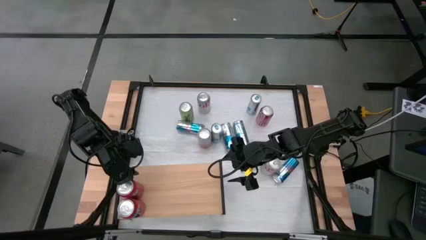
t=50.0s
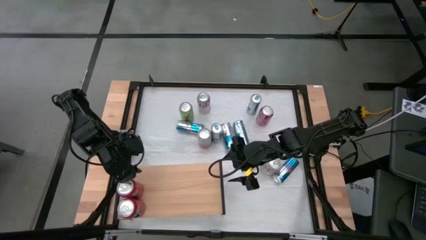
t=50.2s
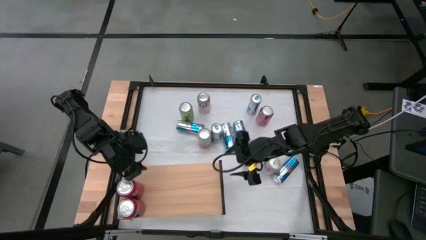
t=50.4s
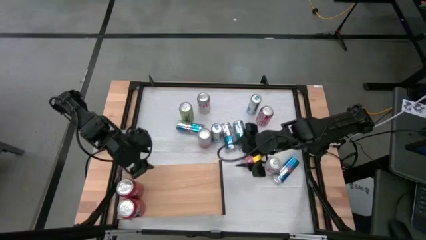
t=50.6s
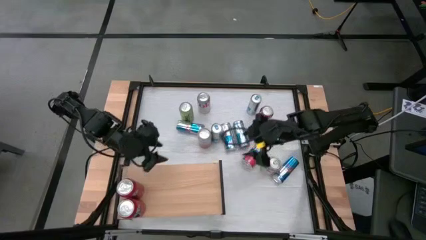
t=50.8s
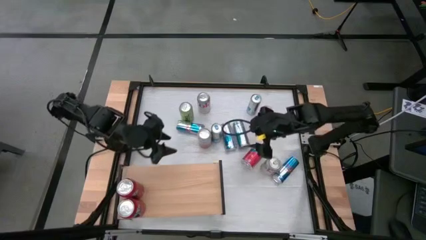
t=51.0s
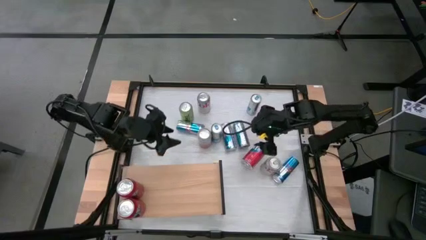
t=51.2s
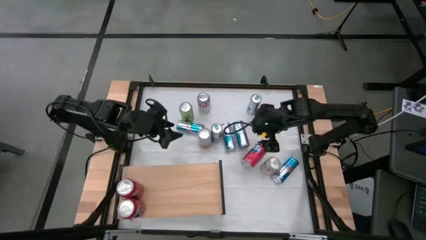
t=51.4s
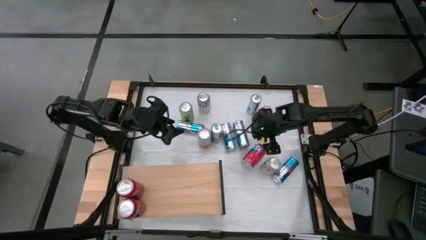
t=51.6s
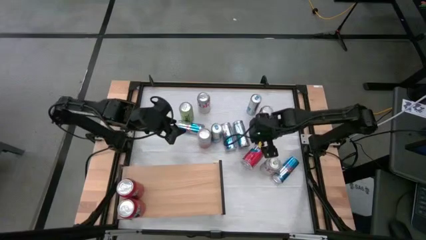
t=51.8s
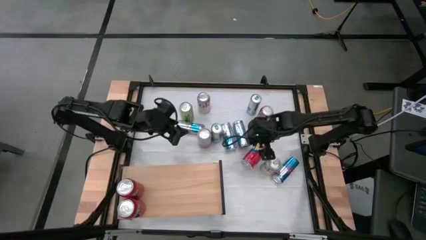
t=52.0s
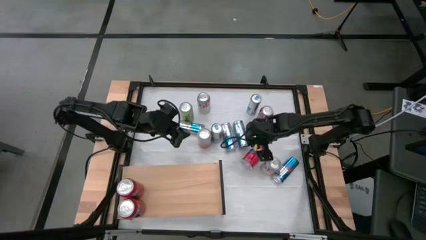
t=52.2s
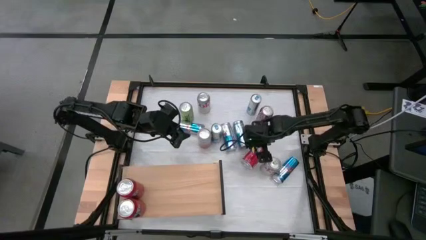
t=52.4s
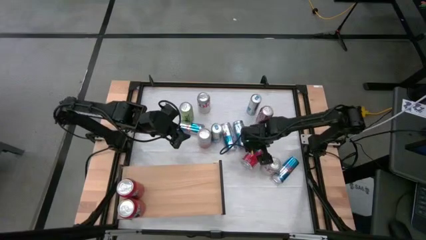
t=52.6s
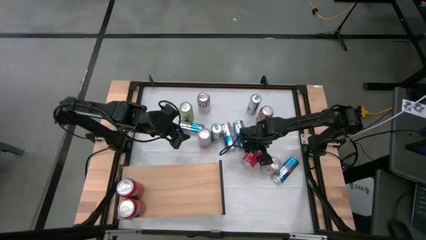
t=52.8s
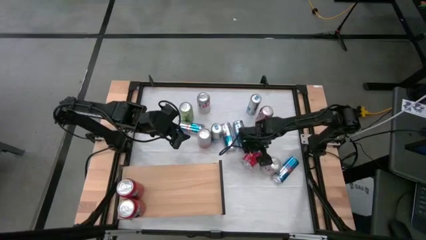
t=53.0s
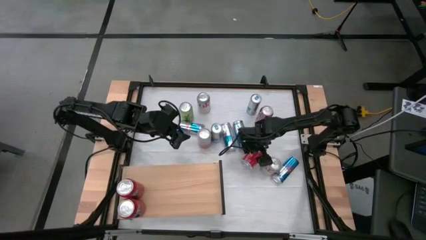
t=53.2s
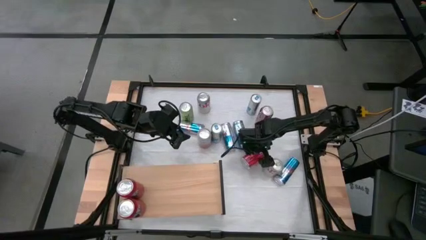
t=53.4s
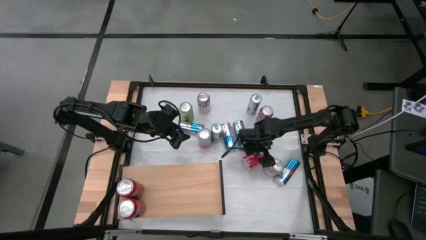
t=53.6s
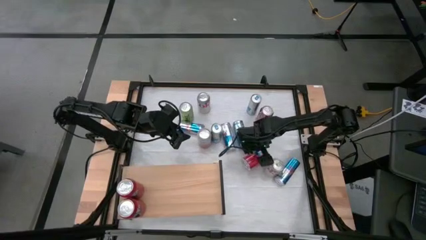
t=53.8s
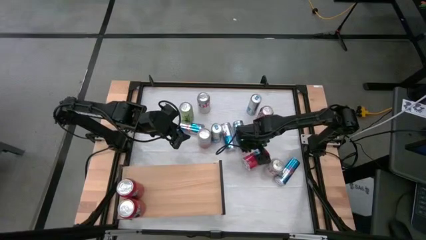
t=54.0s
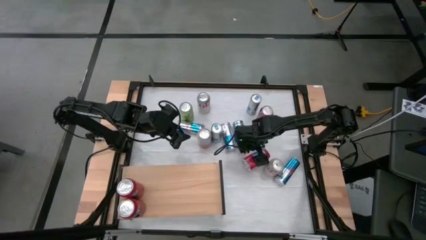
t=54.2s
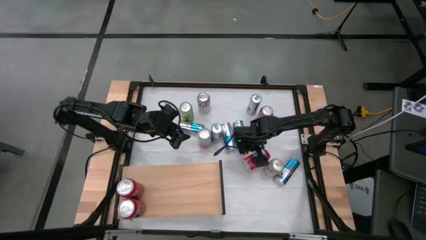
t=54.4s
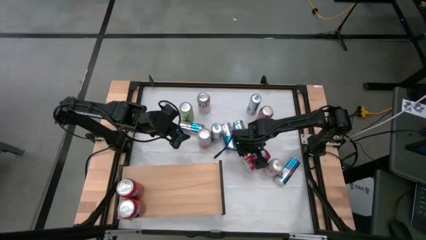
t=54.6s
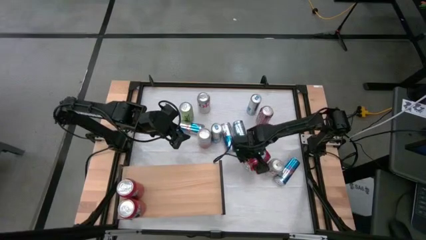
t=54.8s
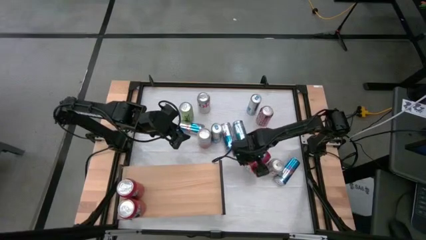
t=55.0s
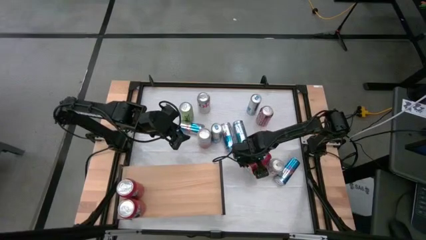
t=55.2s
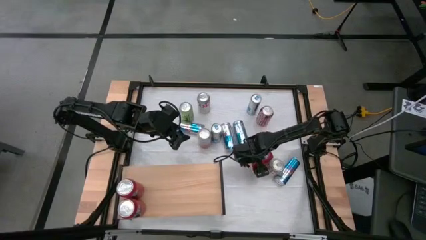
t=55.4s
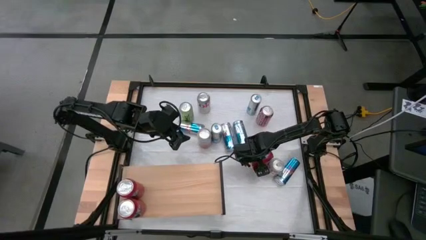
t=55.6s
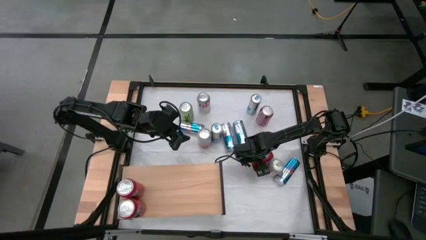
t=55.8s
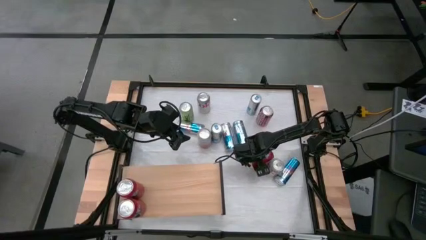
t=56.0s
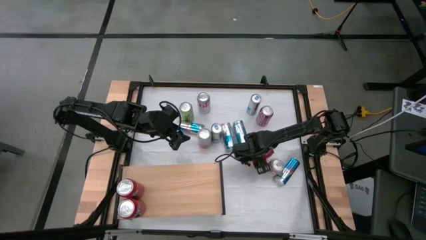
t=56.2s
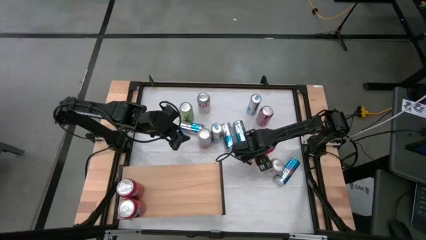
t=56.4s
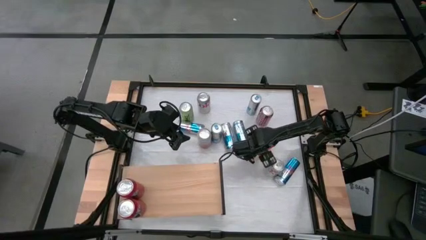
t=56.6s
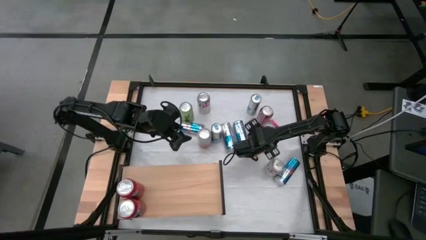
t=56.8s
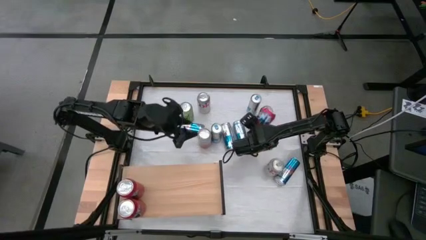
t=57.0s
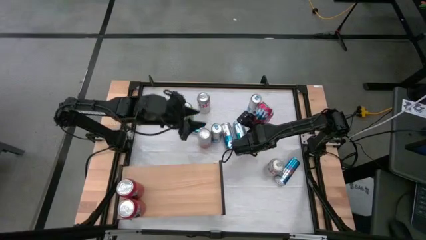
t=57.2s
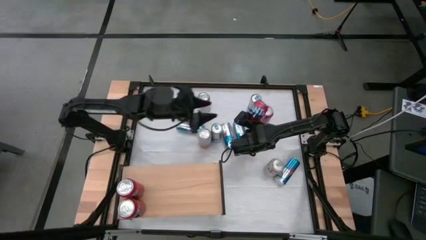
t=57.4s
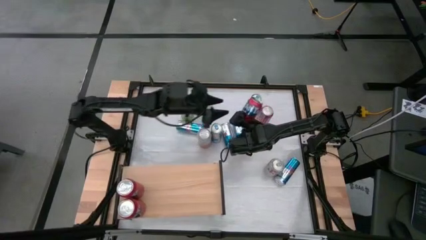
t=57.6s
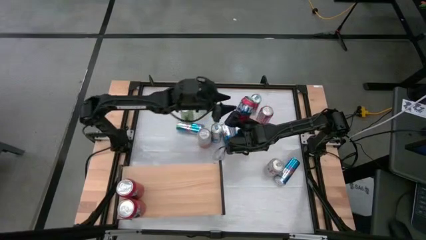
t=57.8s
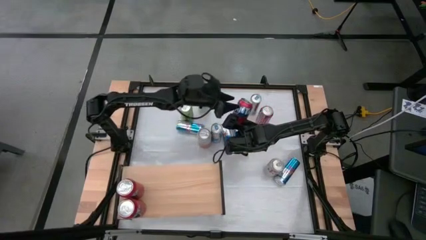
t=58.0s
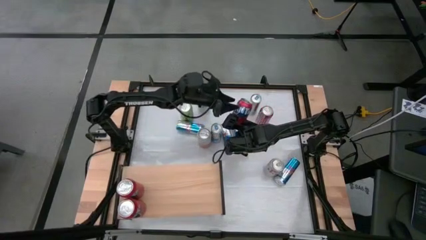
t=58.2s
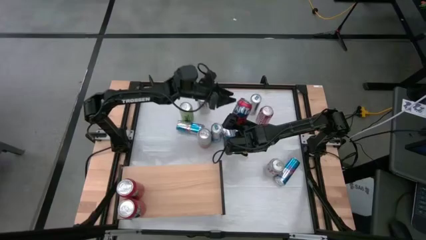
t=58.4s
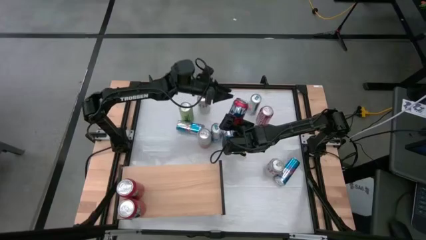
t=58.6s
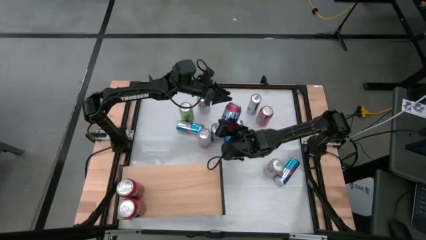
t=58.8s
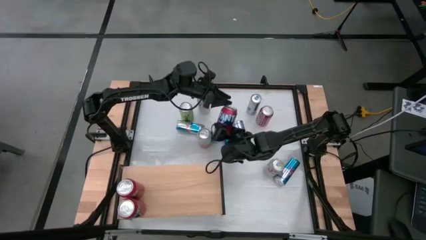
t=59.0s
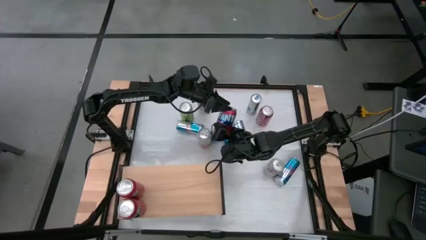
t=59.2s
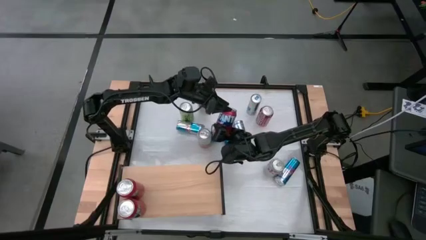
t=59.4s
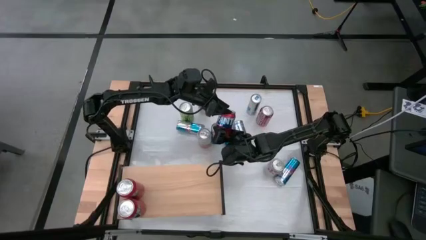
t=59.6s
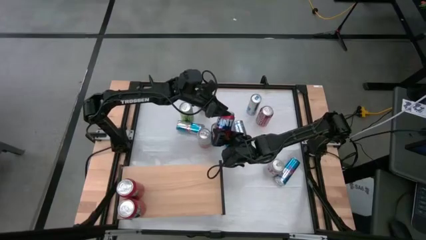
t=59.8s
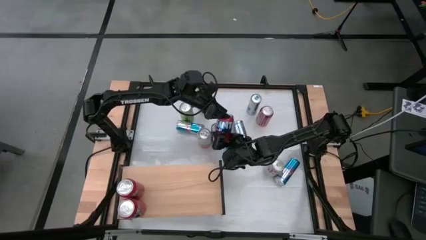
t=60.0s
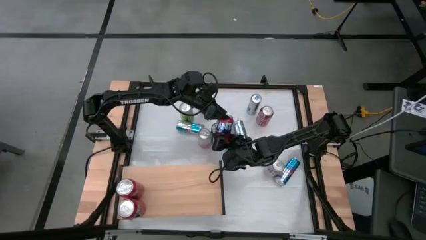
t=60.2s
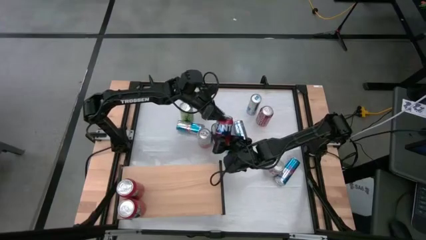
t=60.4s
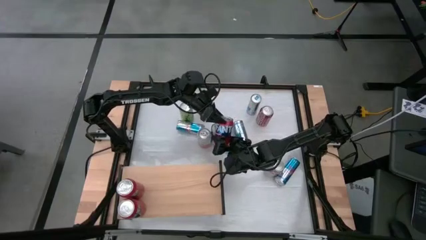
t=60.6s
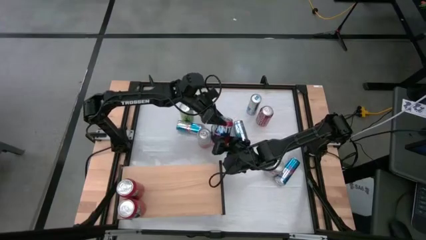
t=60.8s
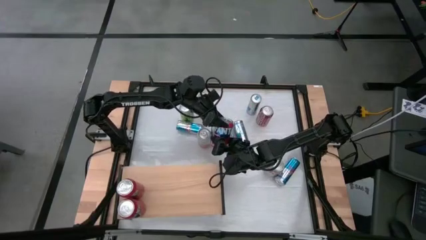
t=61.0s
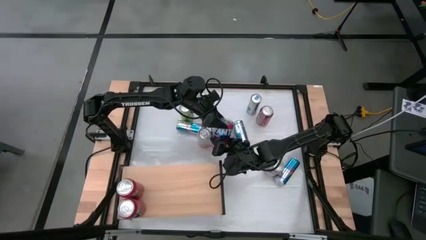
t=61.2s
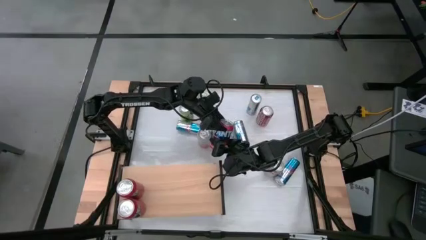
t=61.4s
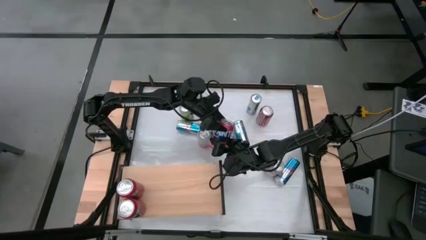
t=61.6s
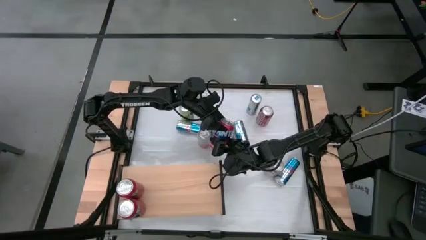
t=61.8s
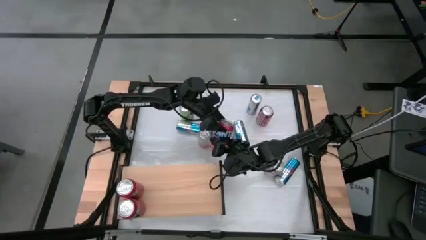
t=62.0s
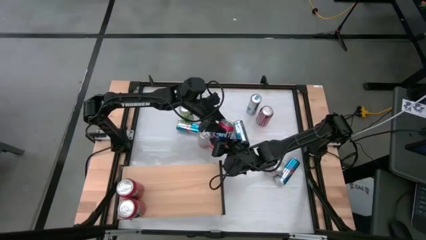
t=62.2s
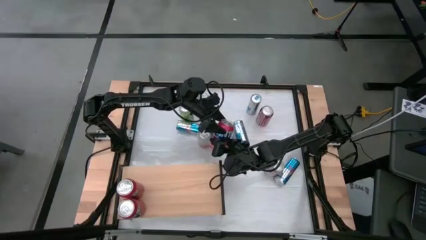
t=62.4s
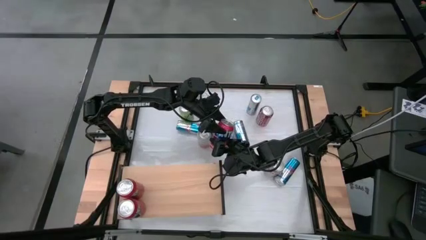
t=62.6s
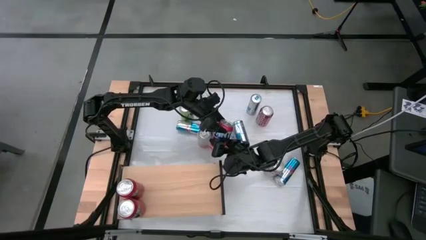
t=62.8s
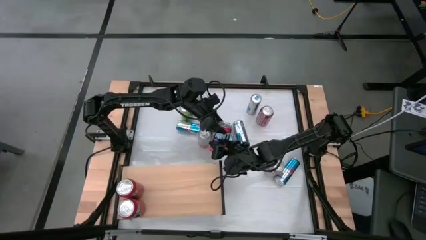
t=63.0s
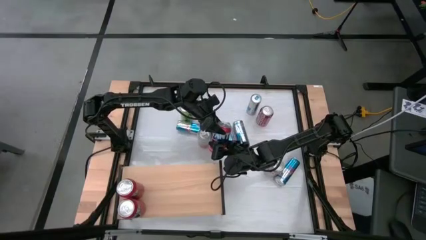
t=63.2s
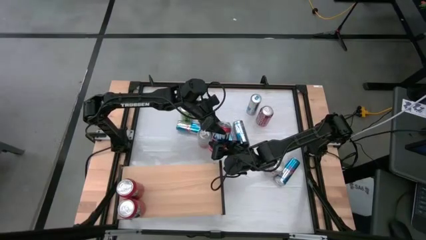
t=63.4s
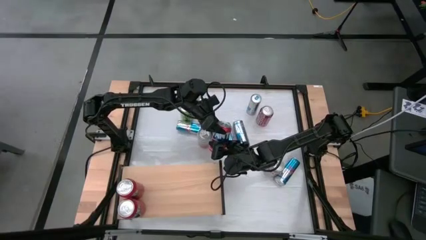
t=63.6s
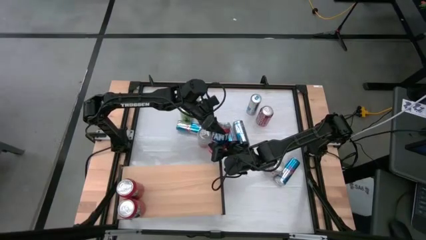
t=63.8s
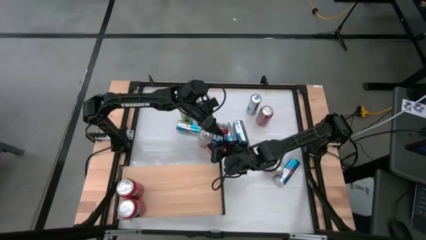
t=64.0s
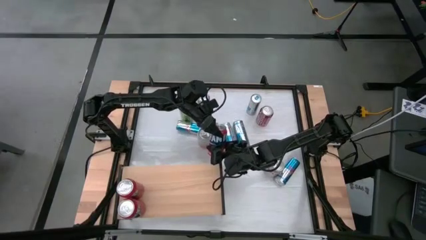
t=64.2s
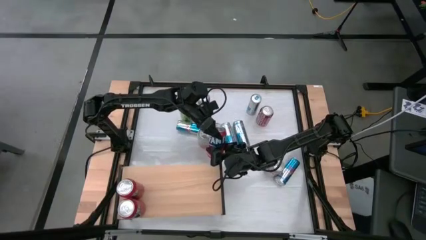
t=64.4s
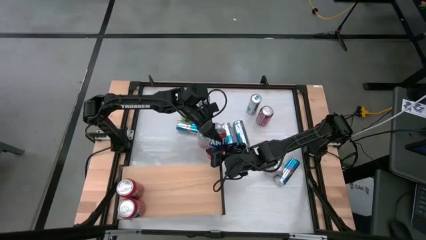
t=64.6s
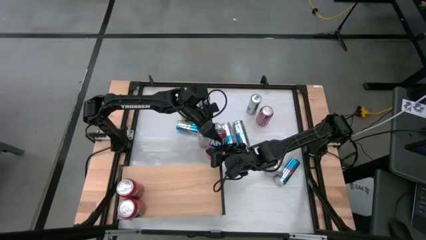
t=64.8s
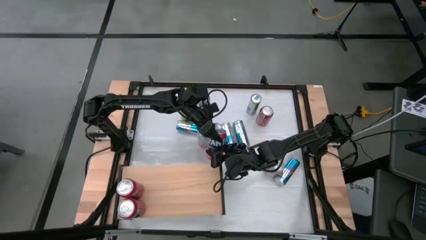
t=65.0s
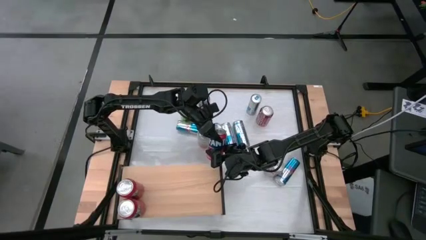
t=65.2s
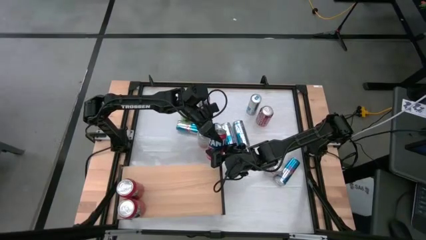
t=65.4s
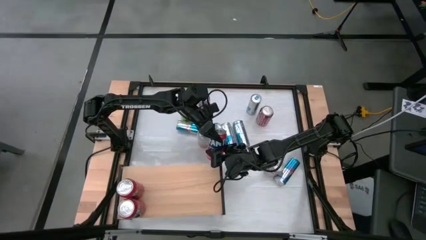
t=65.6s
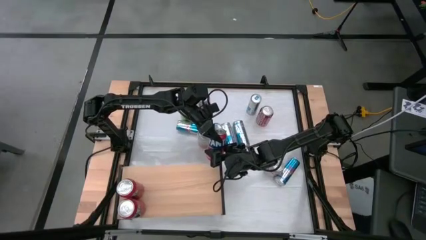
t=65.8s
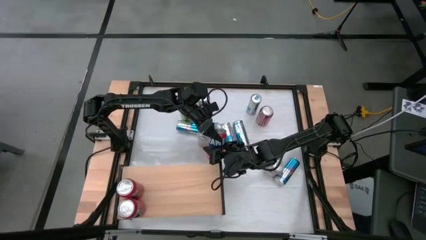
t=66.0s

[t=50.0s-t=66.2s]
Task: Place canned beverage on shelf
Put the orange soda can on the shelf aligned with the orange soda cans

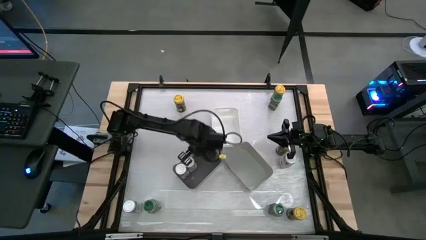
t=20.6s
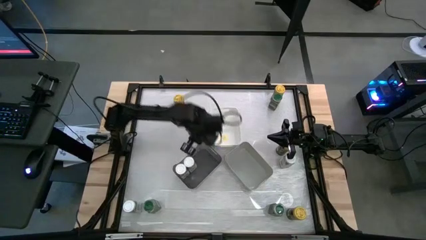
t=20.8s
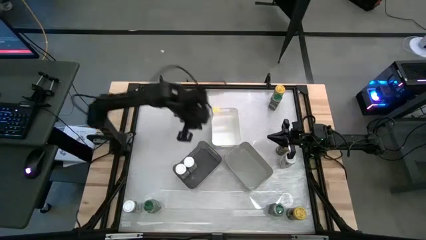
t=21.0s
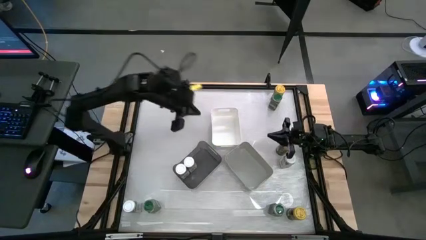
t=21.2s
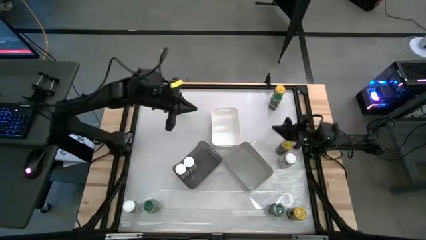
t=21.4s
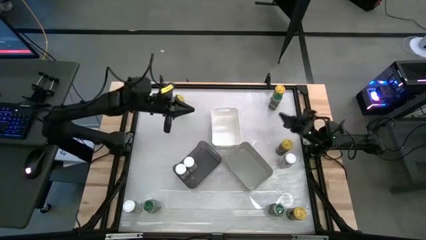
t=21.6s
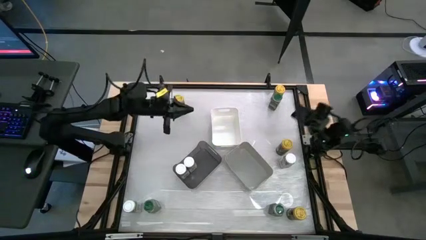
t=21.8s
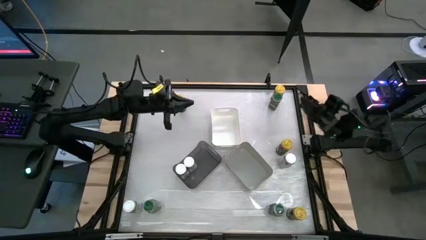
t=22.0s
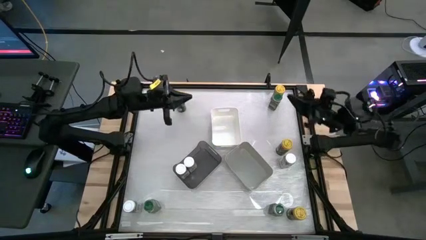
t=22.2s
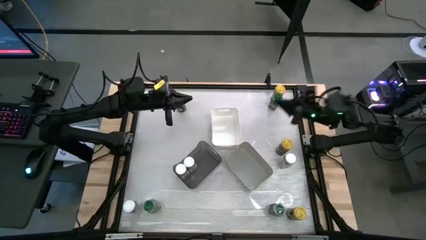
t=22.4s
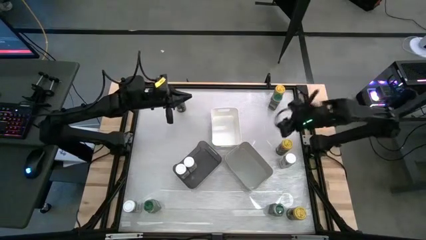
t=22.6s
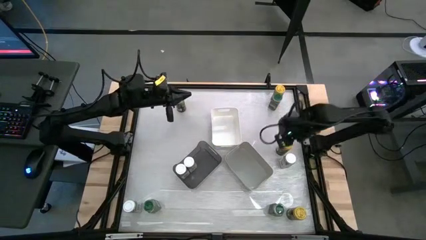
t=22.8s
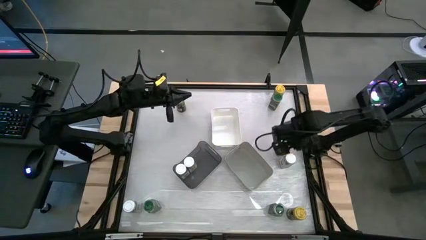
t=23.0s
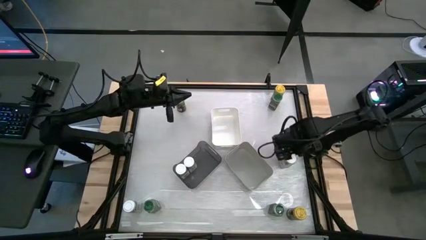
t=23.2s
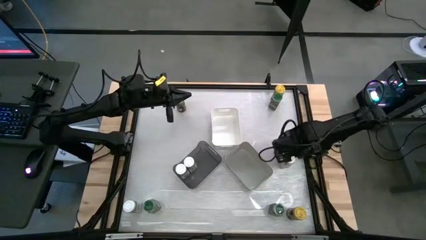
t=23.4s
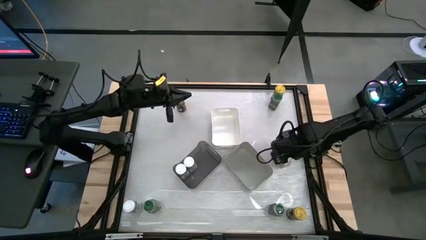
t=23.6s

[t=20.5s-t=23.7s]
Task: Sort spices by type
Put the white seasoning bottle into the black bin
